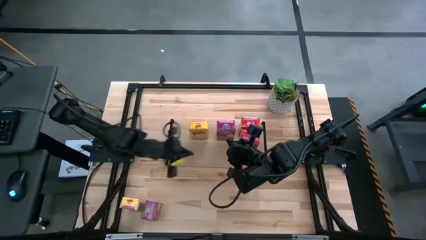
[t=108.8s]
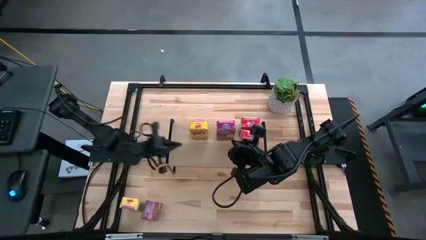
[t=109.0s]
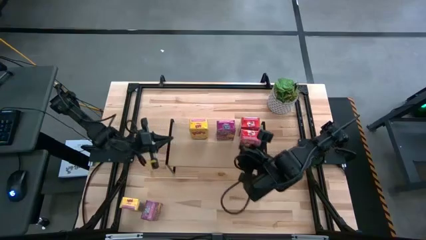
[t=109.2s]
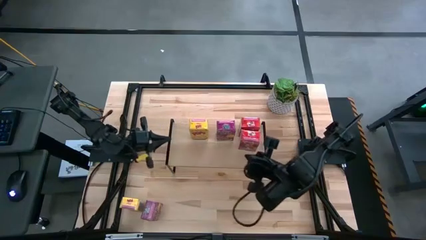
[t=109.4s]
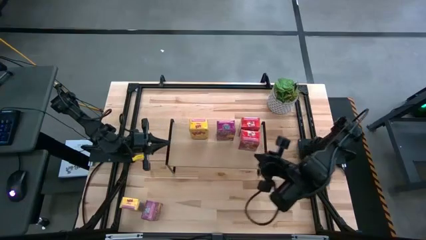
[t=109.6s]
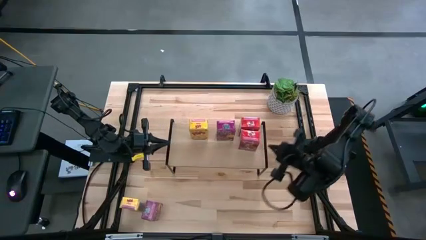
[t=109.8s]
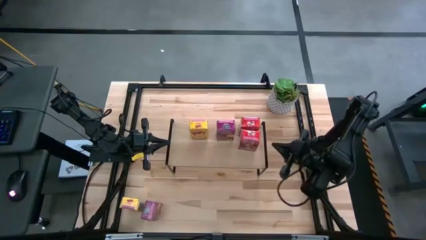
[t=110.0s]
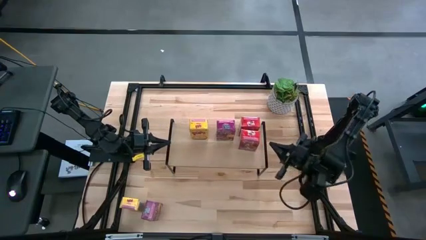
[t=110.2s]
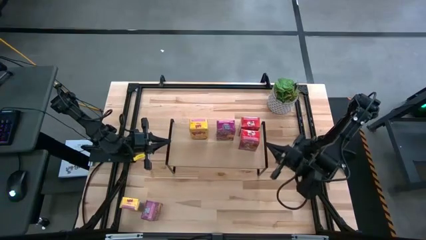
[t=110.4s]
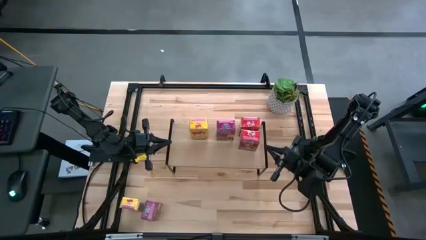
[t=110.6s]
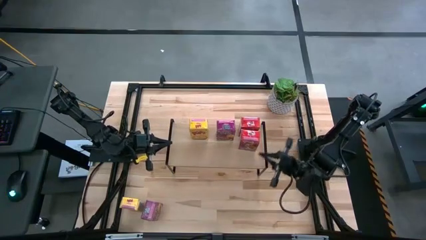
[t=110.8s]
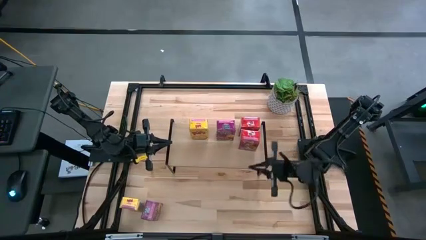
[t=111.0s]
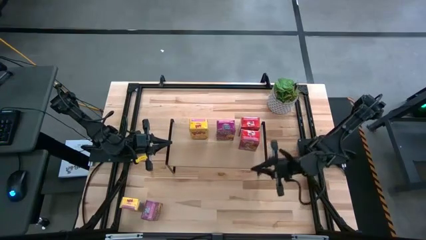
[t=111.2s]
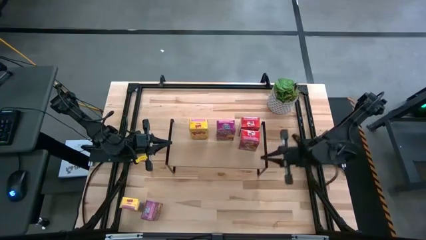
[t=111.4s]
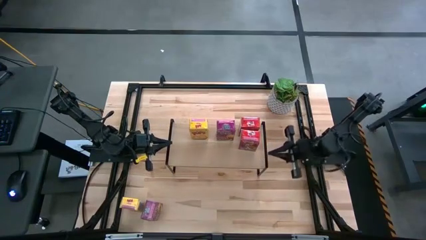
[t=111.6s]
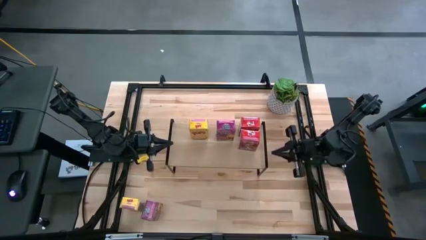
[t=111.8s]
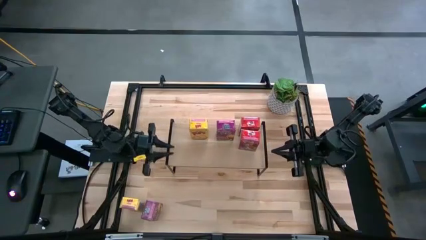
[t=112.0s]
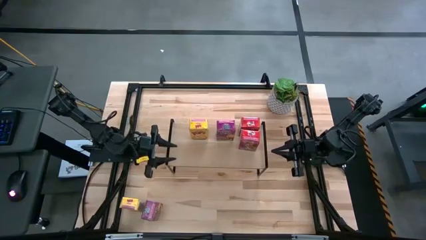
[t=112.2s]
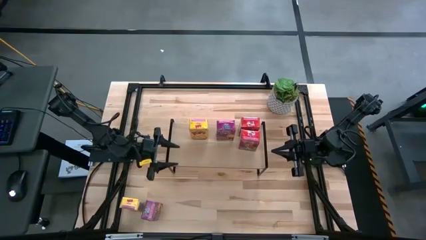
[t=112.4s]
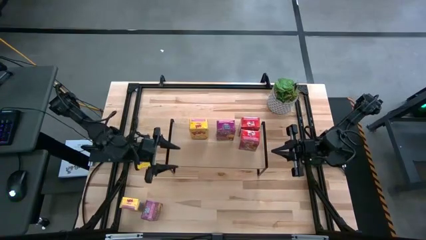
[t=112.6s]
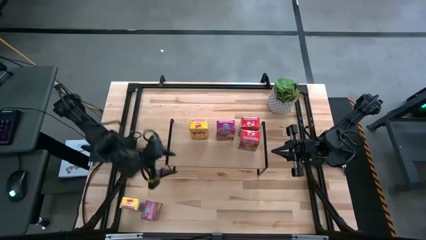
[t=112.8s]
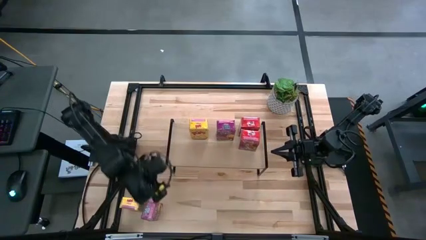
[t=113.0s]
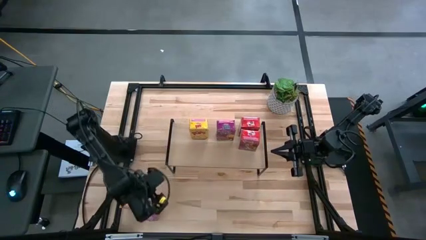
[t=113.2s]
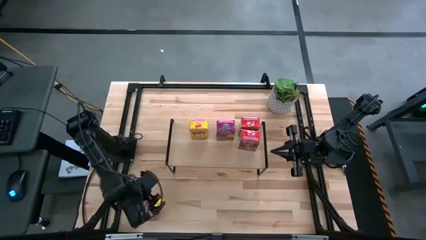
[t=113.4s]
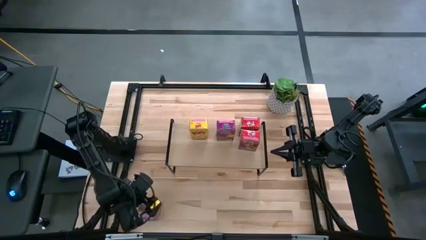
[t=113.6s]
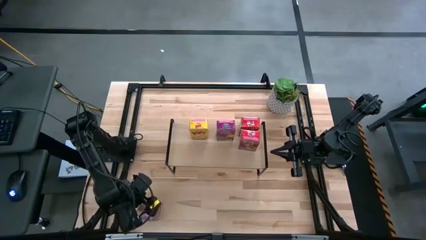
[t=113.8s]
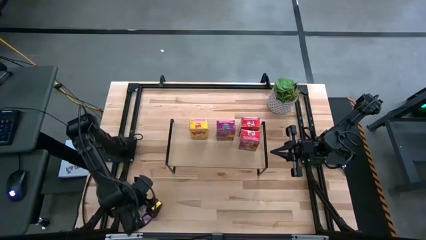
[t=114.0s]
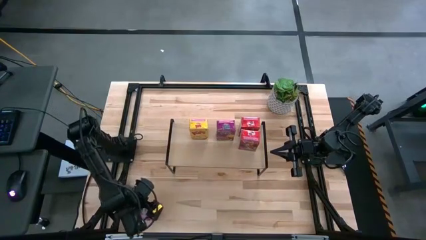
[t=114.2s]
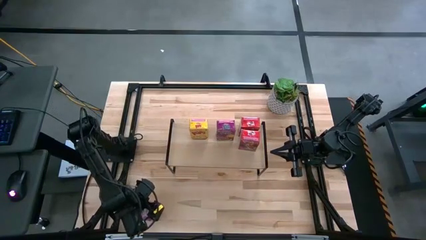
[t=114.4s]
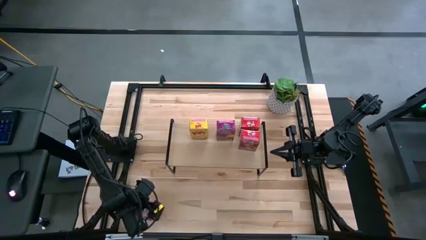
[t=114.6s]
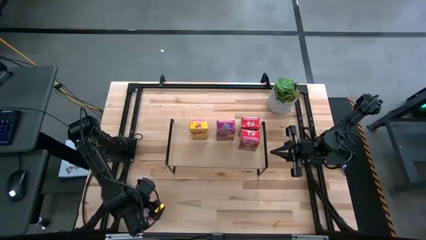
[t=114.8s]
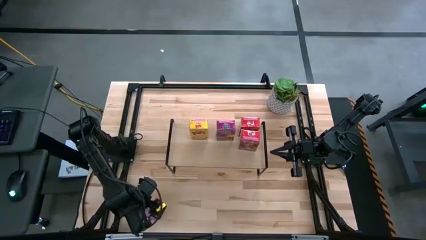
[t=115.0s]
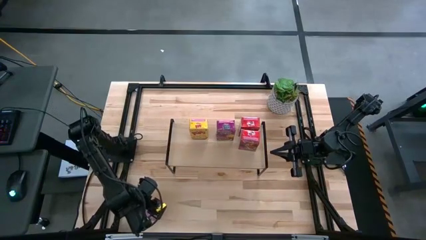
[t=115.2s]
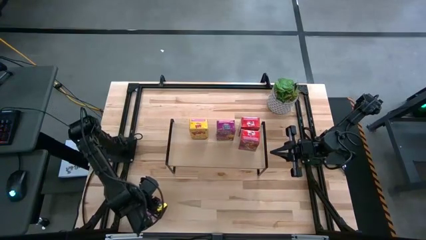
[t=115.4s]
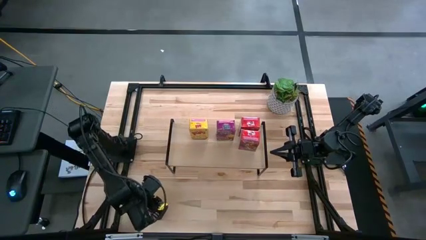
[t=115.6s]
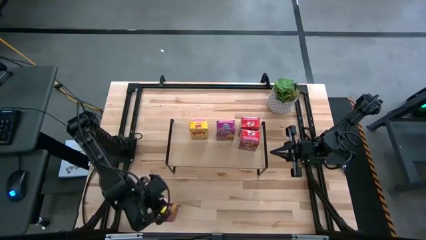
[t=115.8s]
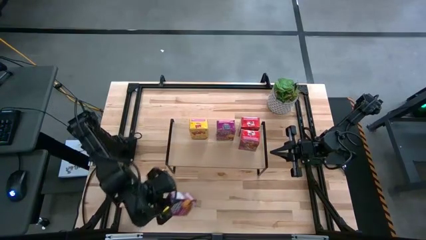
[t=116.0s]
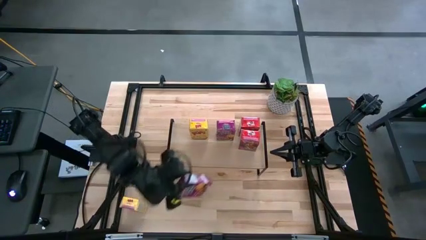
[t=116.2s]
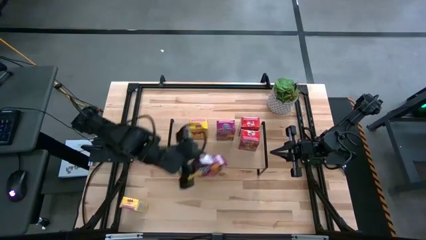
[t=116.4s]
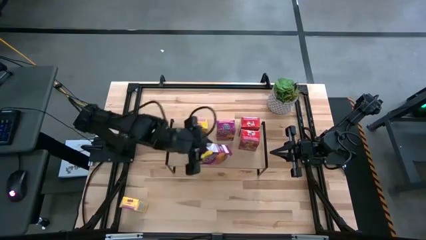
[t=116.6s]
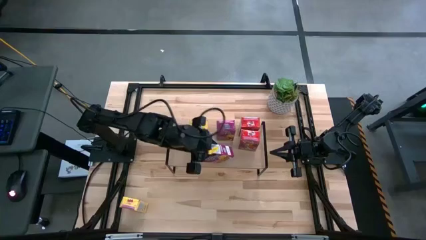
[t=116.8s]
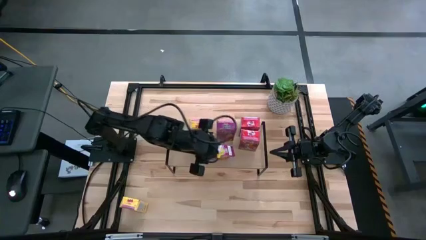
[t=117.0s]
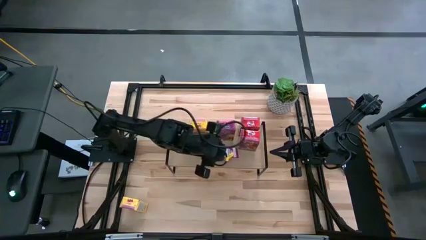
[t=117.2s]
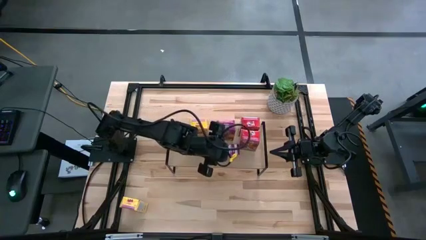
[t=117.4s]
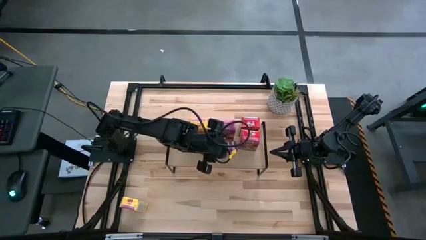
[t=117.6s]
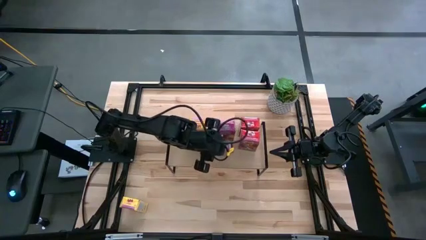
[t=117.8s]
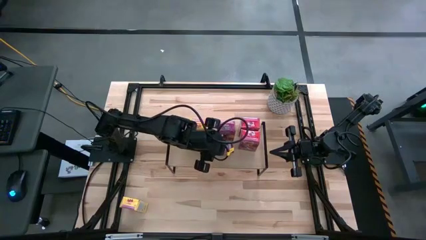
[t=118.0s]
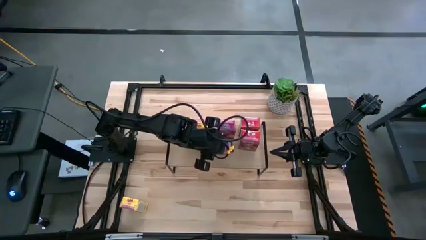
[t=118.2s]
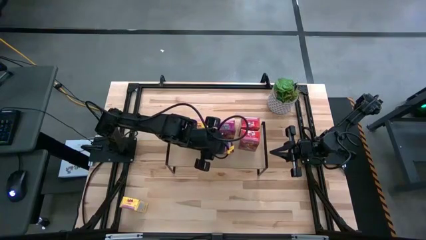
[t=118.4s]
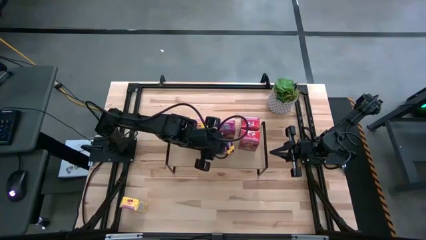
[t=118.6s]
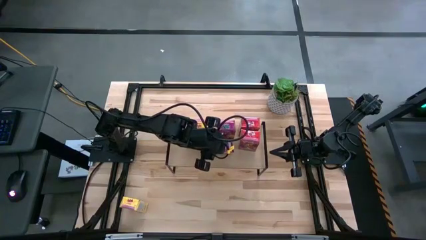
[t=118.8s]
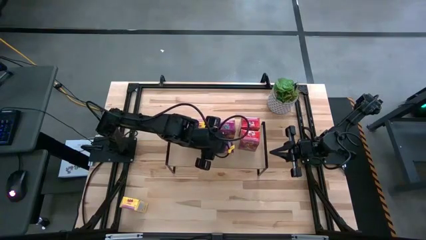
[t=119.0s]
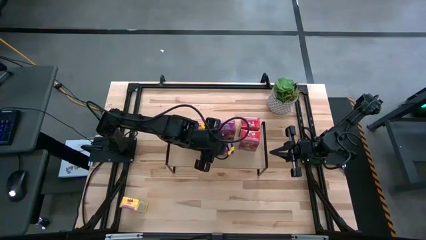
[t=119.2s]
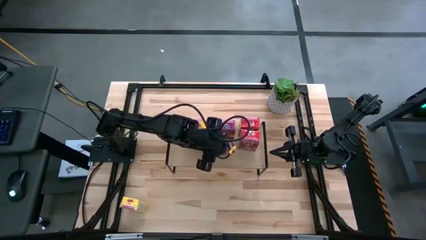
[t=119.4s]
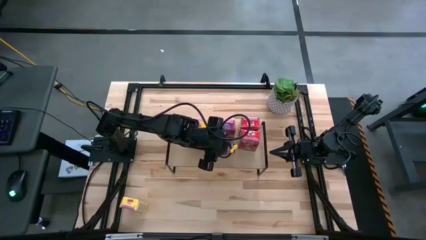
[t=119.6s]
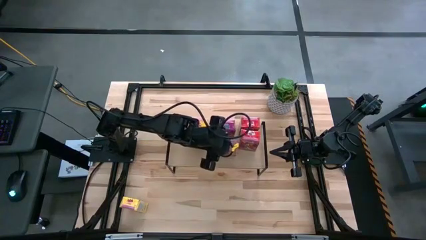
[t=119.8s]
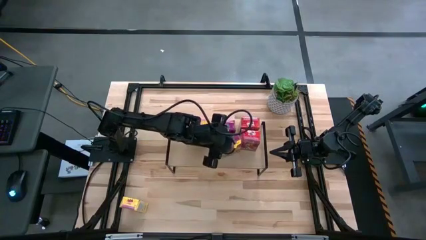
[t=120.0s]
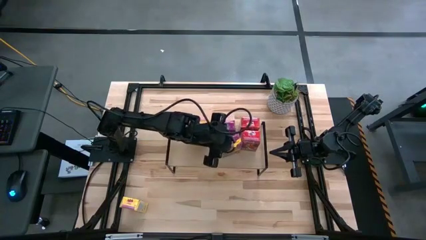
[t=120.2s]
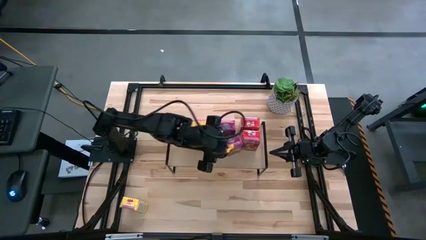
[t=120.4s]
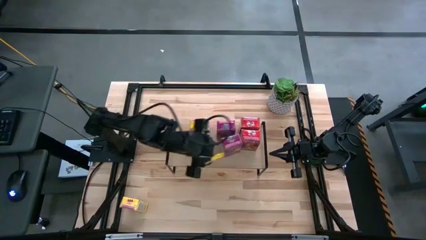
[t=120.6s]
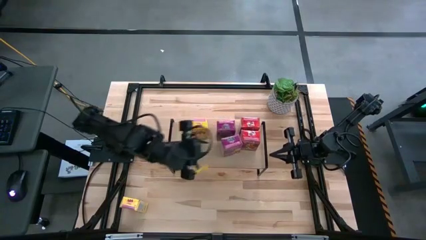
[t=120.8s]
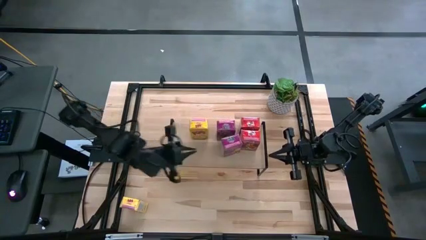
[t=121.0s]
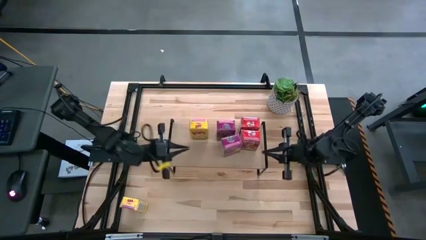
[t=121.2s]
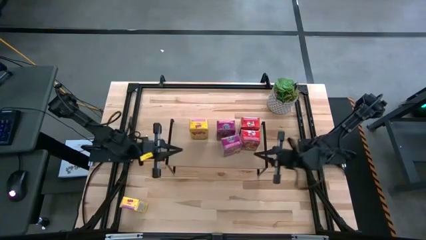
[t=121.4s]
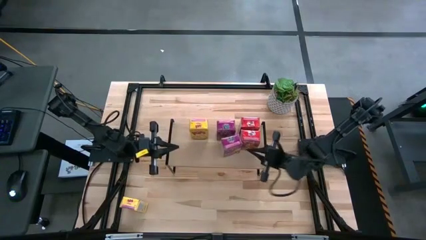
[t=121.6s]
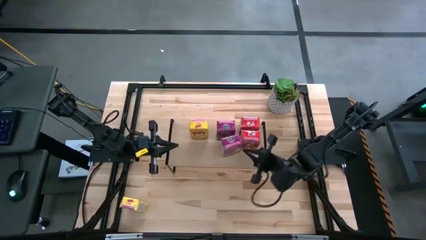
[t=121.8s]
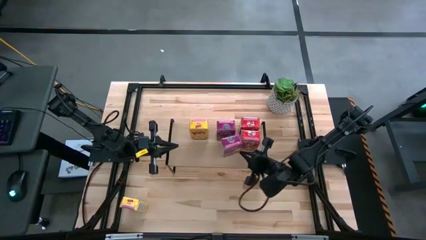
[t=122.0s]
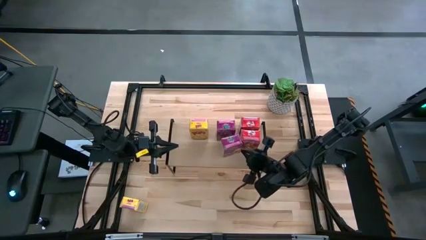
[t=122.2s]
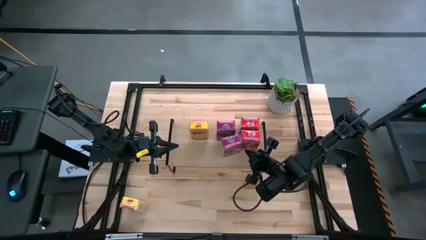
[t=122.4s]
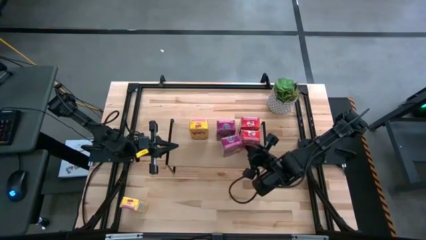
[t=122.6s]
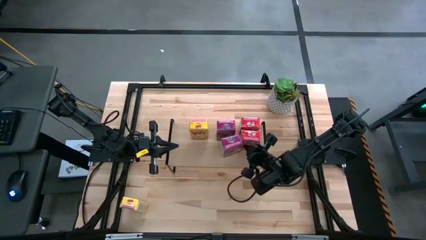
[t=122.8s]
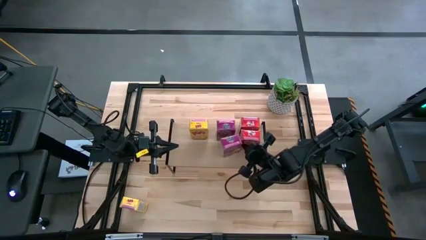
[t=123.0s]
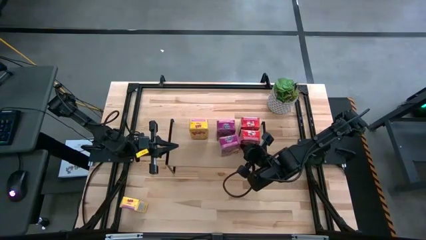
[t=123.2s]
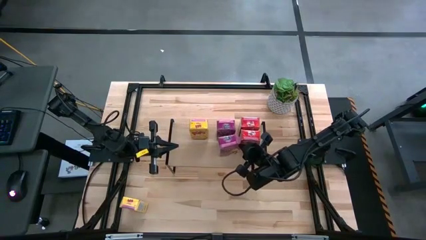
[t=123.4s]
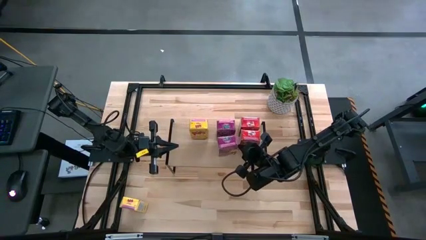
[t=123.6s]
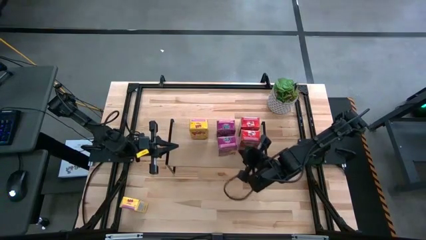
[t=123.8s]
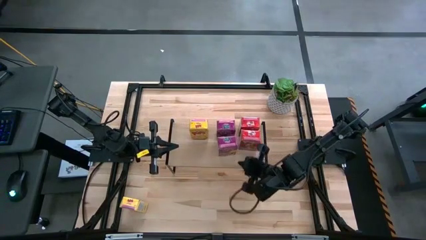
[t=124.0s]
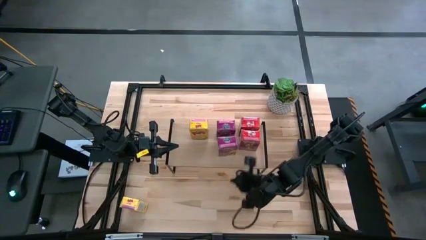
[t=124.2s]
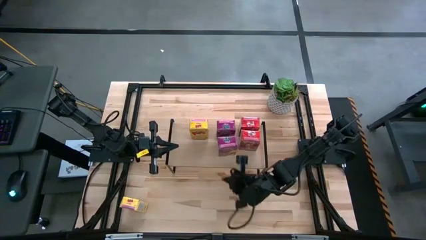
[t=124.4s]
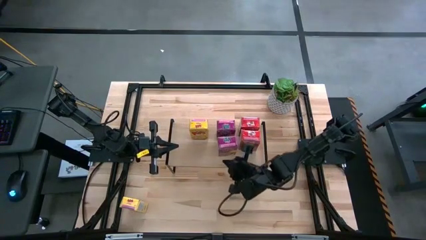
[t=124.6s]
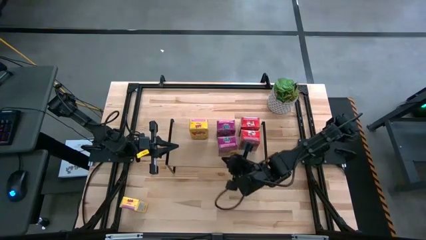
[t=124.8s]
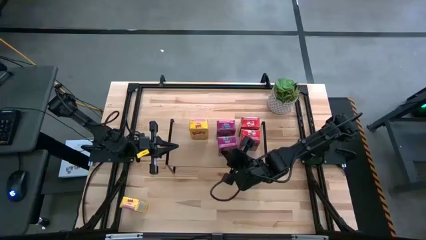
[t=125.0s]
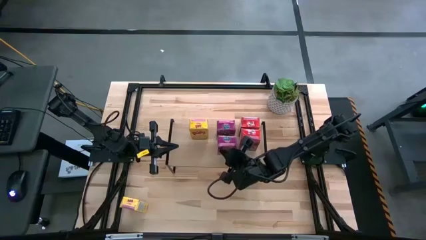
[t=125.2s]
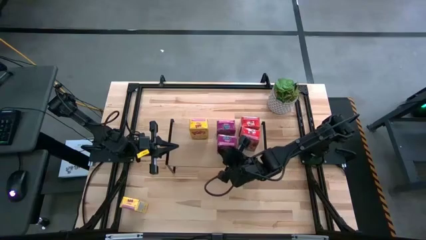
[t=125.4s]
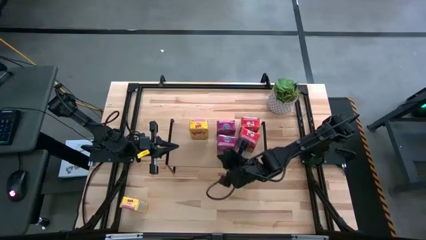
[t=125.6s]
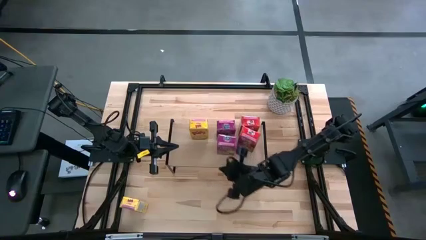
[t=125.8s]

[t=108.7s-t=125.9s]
Task: Stack cereal on shelf
Put the purple cereal box on the shelf aligned with the purple box
